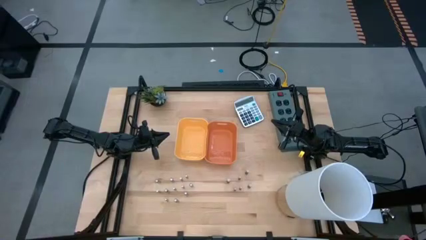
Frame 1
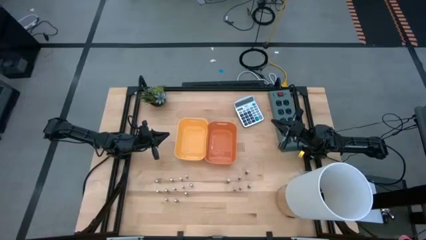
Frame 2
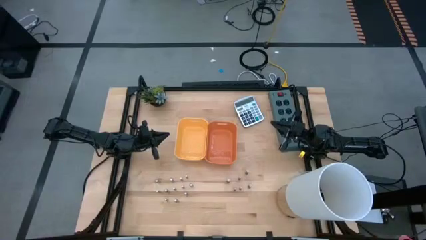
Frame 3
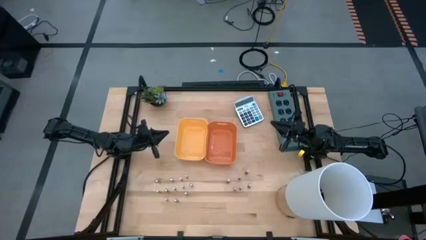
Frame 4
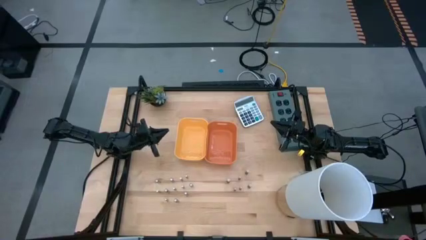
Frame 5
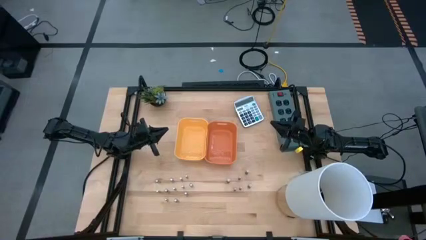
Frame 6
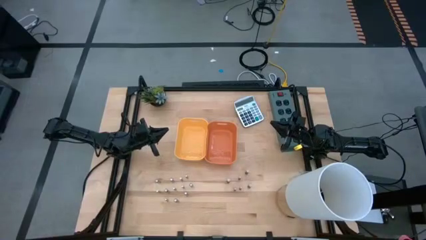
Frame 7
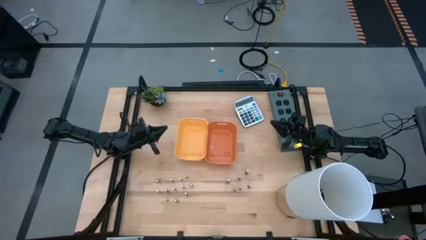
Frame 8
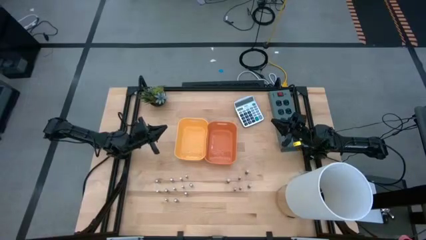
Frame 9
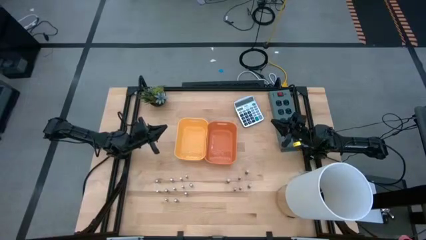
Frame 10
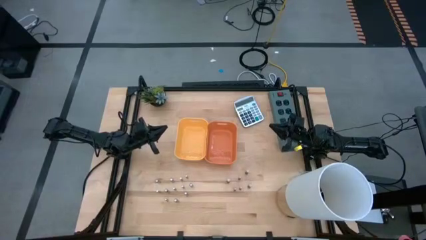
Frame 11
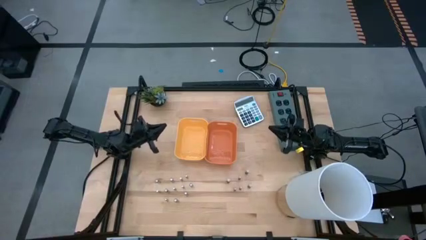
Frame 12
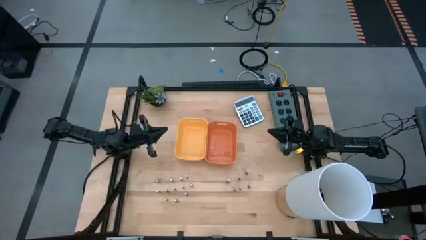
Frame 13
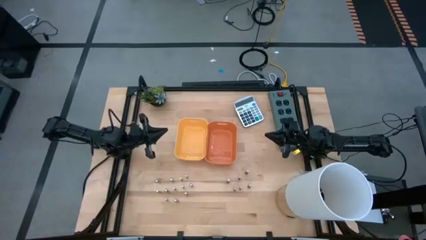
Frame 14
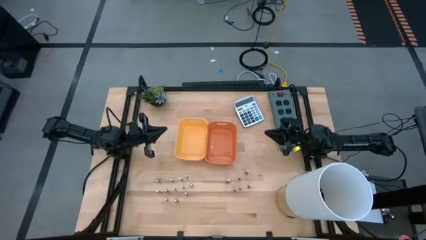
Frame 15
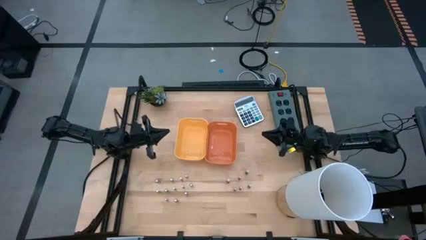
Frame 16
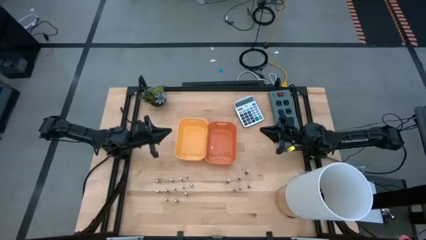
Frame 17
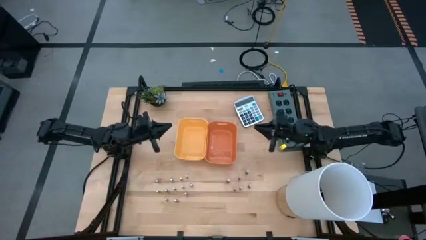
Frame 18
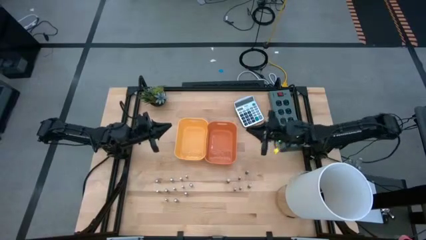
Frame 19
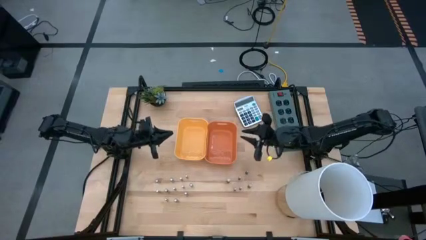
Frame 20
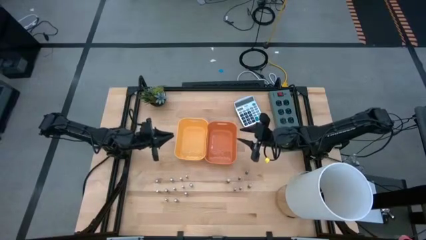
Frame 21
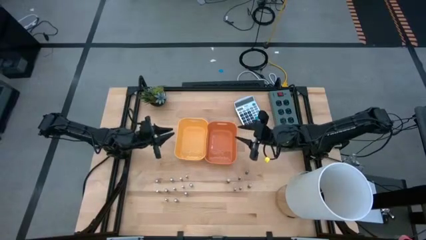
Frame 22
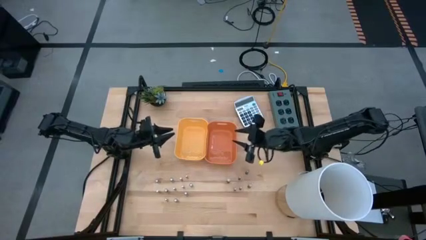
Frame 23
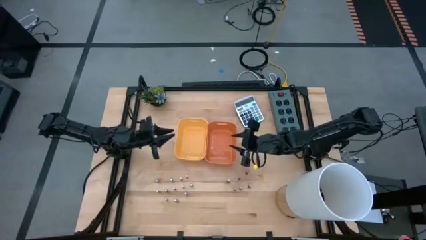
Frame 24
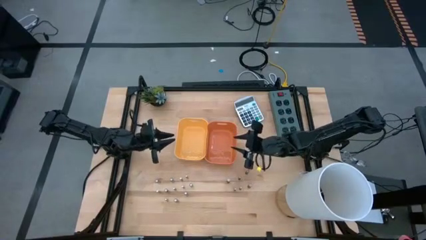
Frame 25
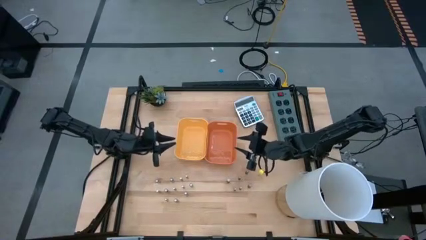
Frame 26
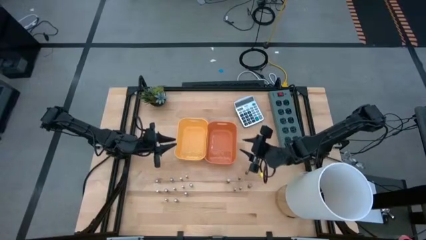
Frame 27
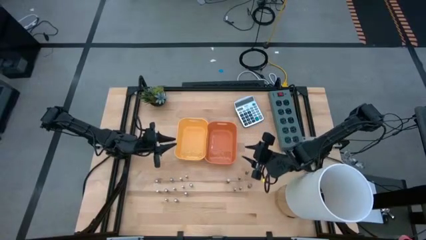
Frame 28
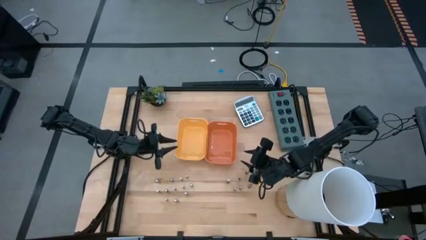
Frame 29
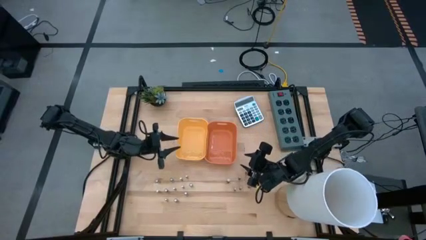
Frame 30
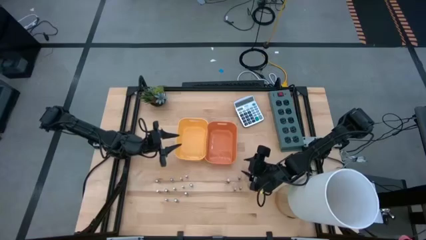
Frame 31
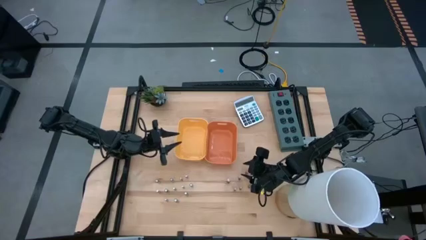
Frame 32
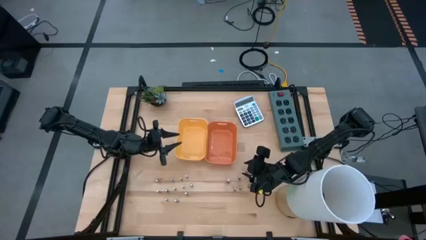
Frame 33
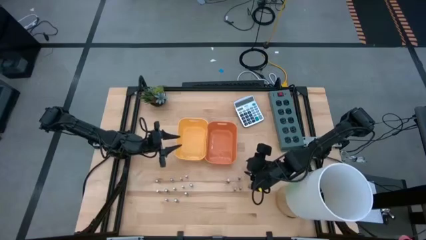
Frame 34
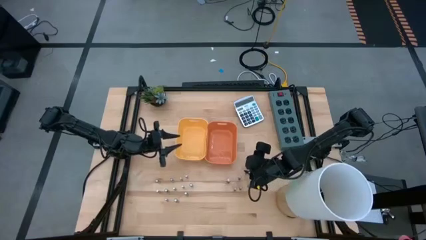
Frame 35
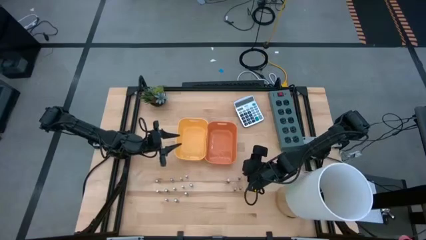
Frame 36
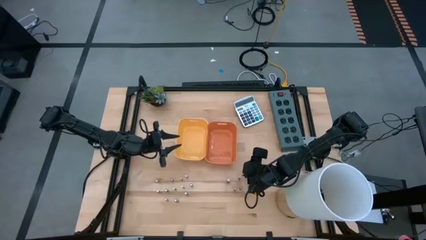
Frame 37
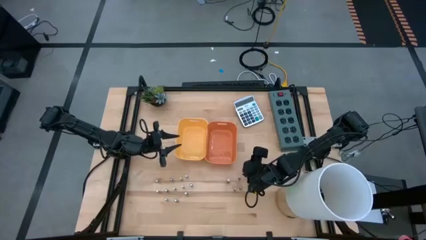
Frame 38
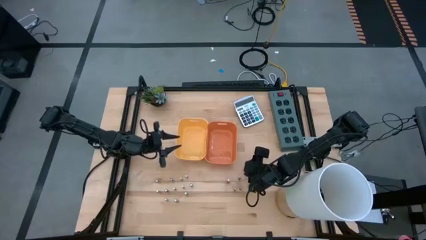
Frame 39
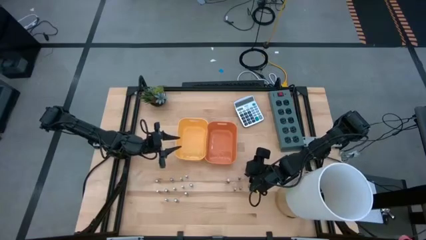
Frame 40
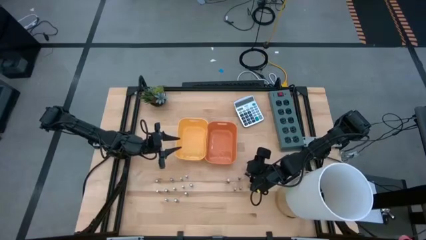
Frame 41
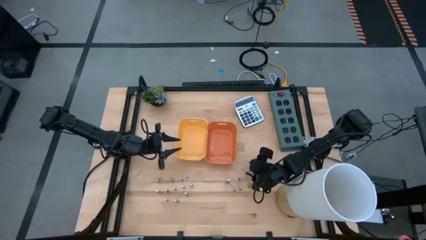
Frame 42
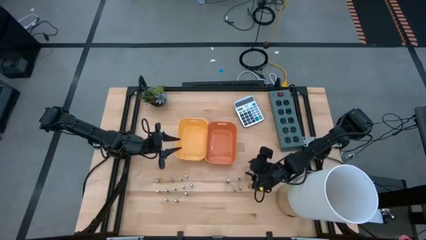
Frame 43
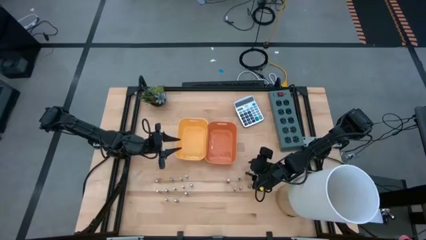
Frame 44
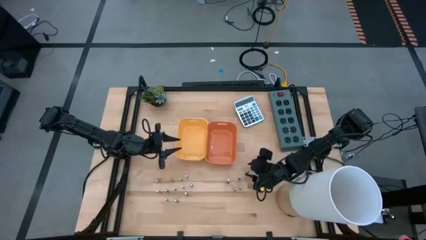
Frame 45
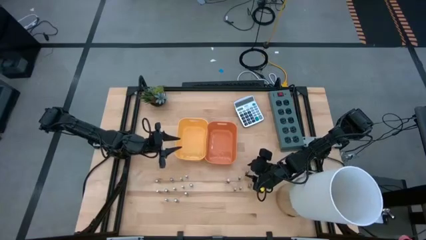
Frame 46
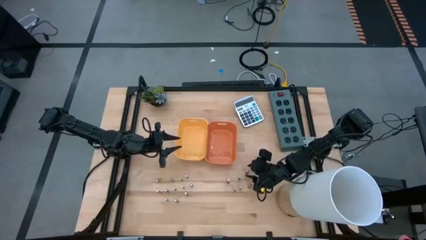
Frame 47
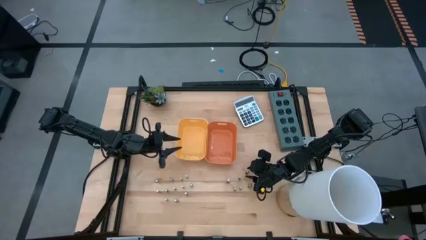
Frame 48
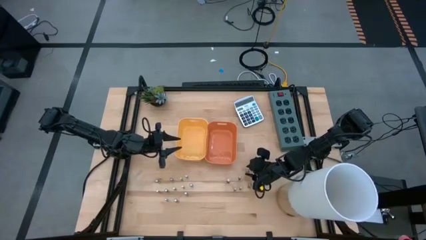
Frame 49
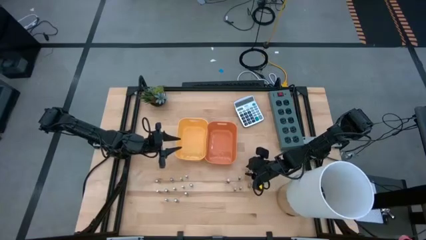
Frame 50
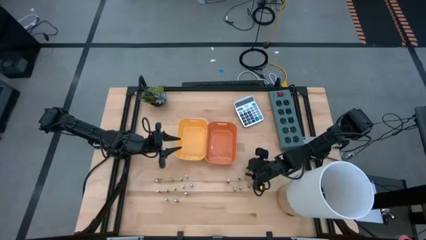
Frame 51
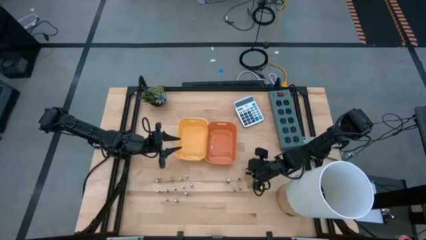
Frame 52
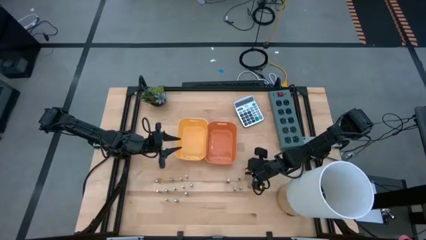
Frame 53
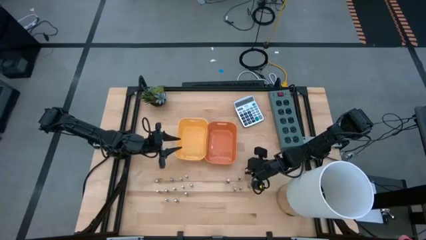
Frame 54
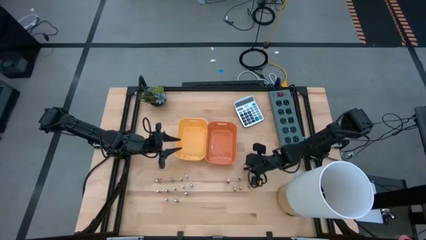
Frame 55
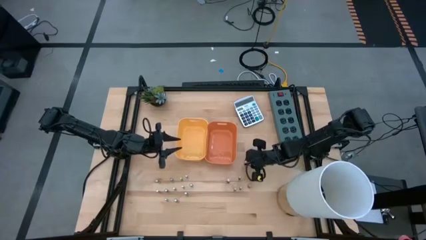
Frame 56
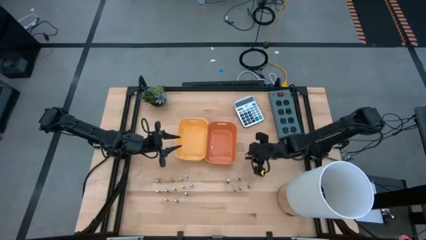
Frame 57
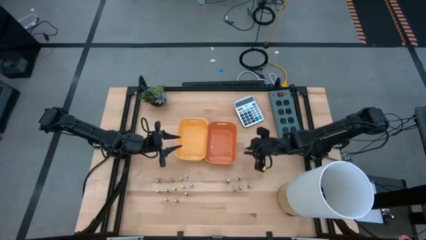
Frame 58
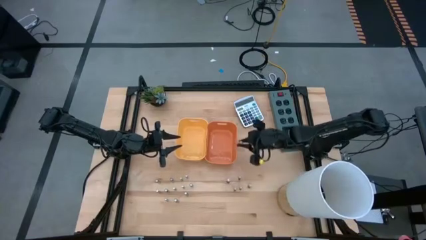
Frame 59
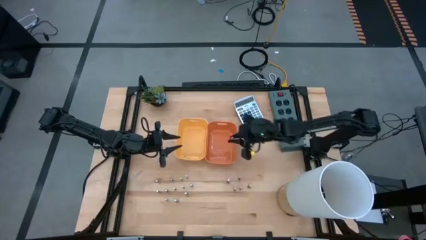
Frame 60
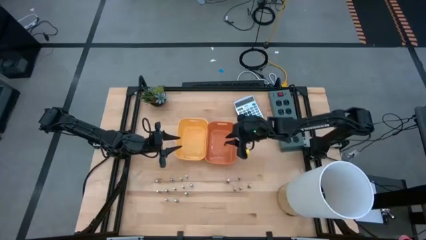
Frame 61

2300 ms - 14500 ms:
Task: Sort batteries
Put the black battery into the orange bin

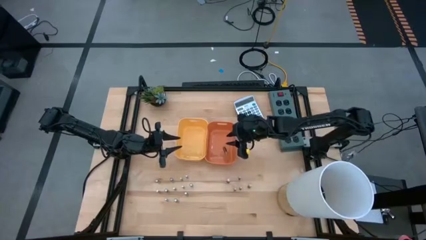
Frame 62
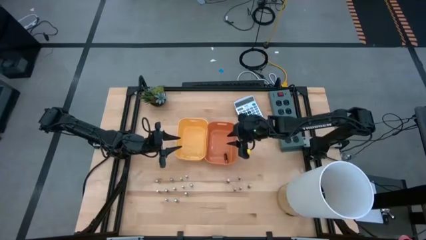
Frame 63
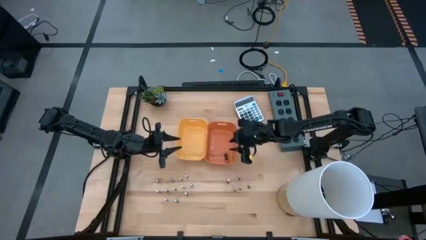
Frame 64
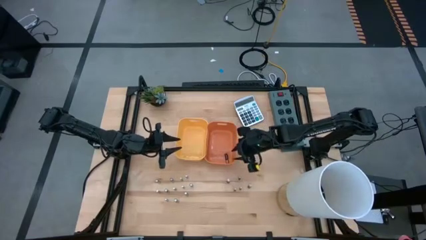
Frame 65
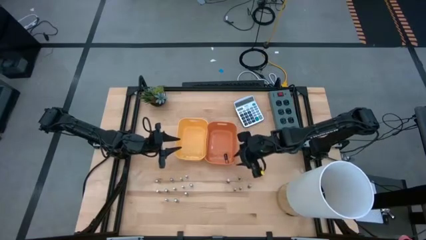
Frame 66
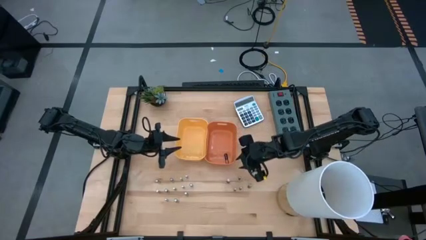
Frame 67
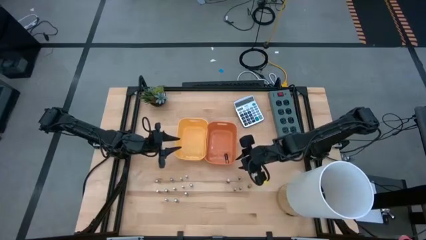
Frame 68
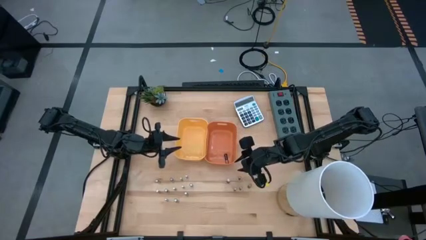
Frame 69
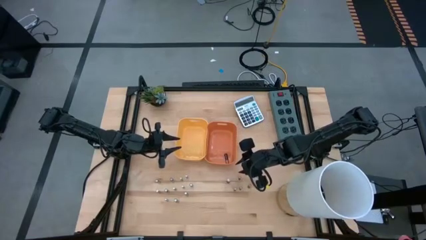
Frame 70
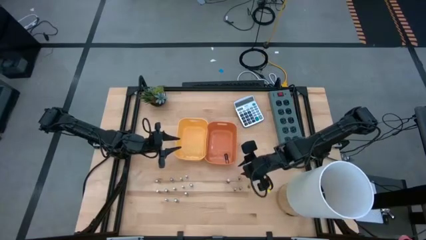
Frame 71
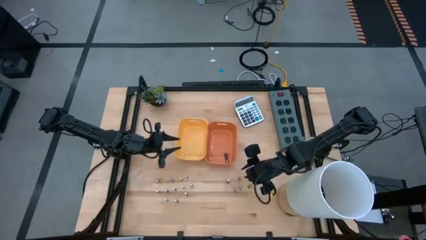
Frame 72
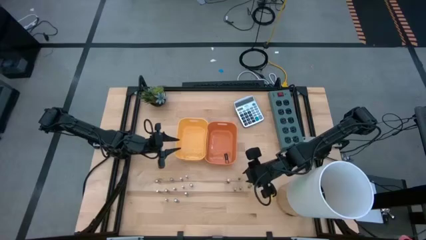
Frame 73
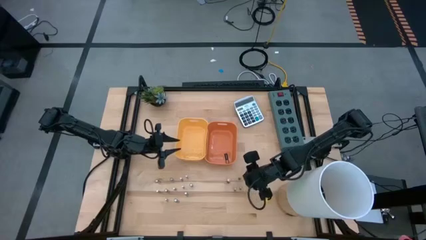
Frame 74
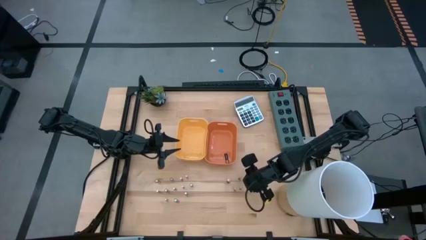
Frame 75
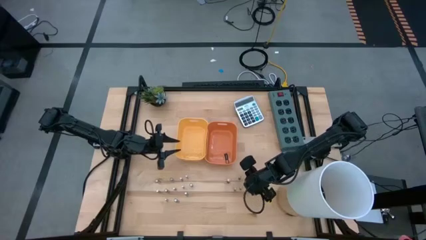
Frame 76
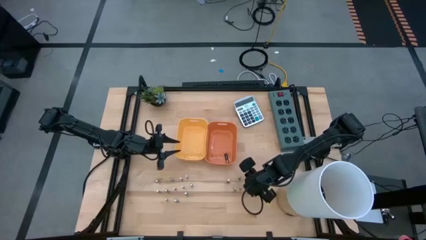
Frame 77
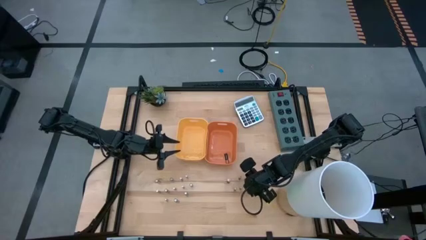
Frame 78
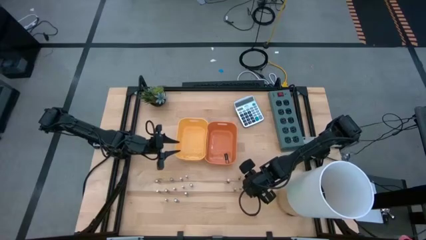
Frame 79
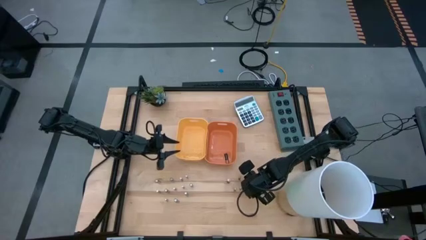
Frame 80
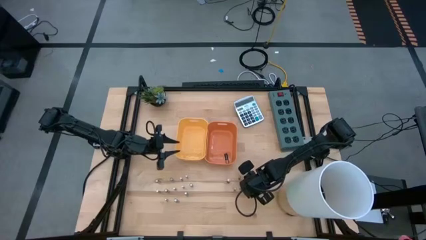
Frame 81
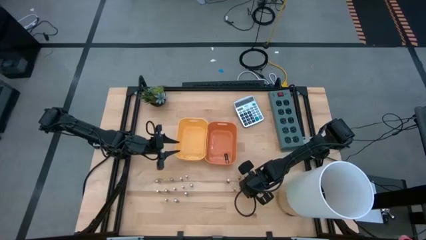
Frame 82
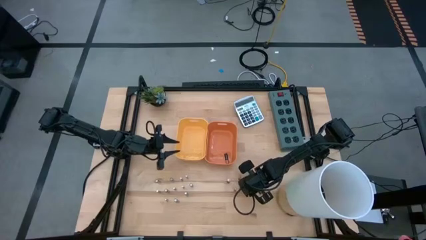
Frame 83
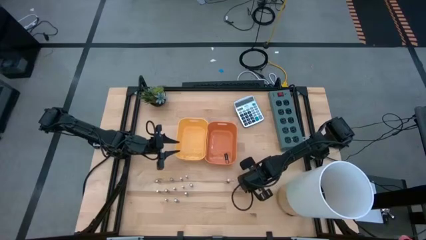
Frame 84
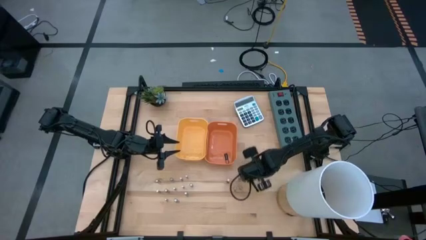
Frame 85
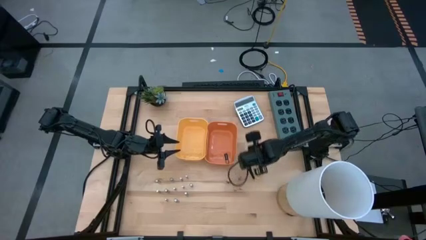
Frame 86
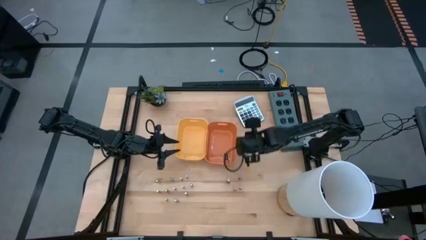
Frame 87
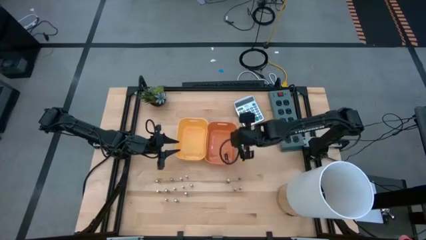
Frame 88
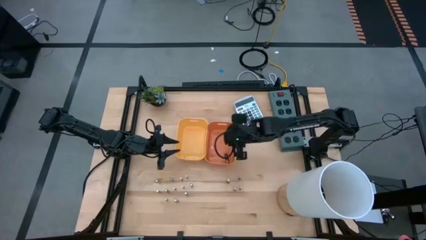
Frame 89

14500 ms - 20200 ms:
Put the black battery into the orange bin
